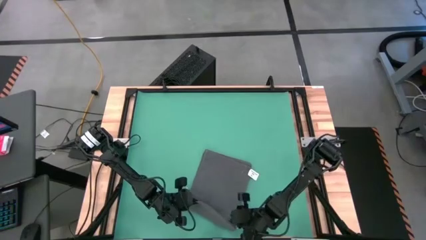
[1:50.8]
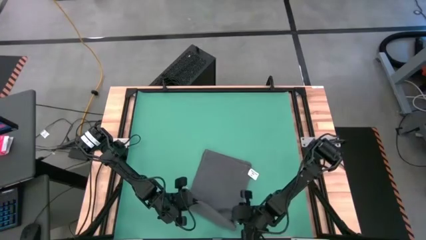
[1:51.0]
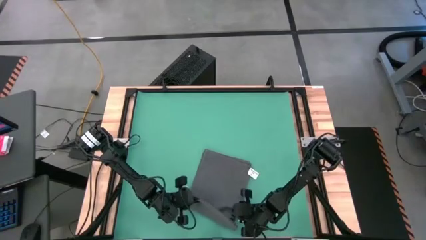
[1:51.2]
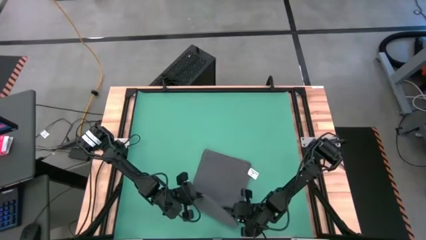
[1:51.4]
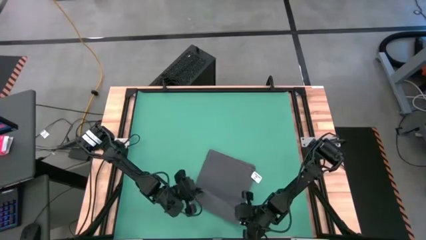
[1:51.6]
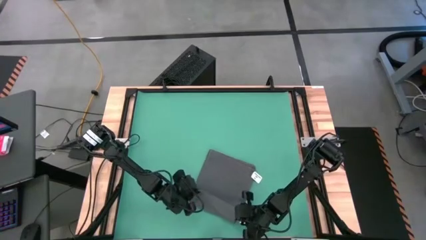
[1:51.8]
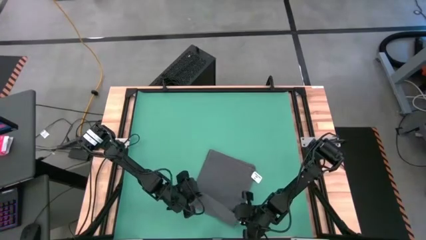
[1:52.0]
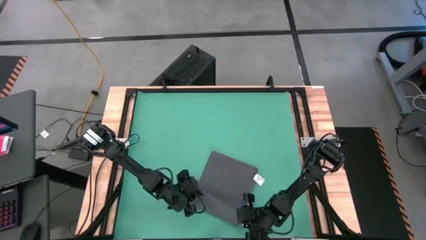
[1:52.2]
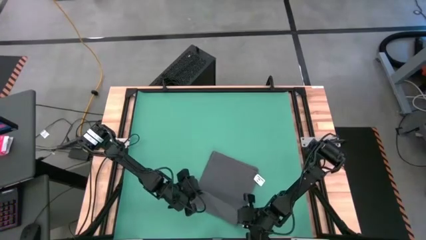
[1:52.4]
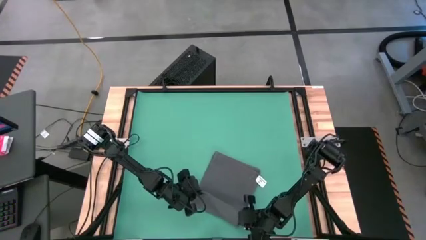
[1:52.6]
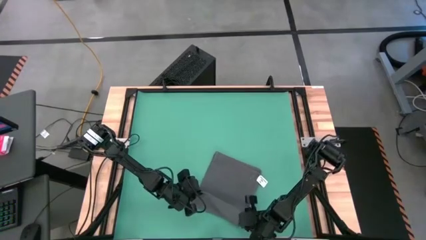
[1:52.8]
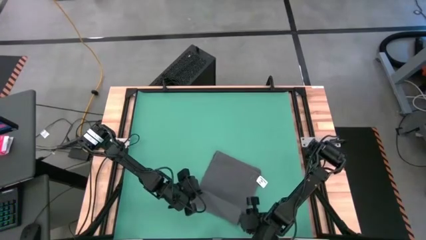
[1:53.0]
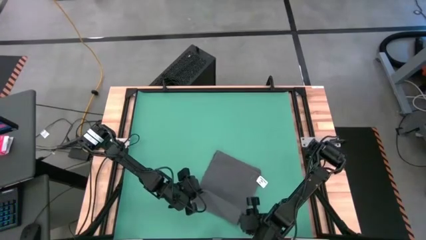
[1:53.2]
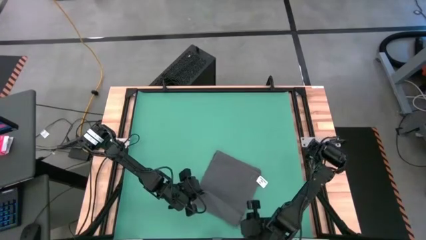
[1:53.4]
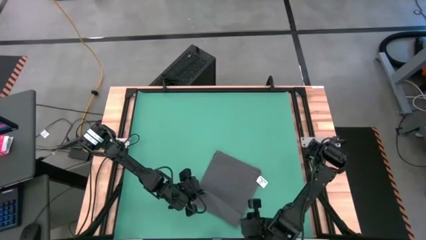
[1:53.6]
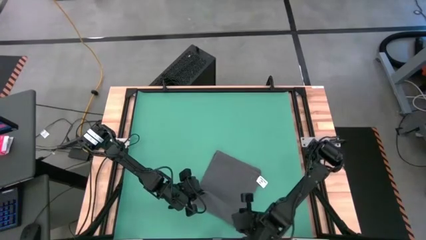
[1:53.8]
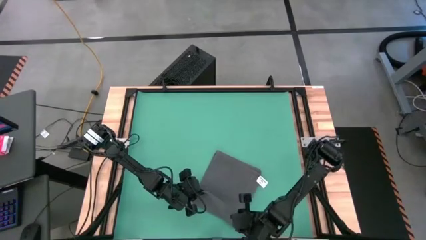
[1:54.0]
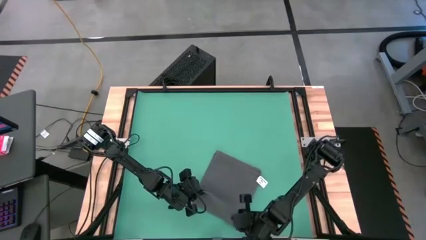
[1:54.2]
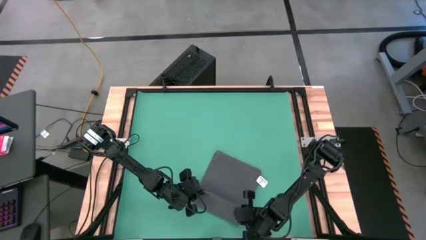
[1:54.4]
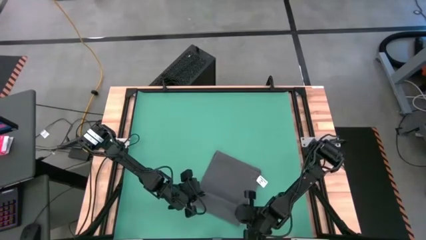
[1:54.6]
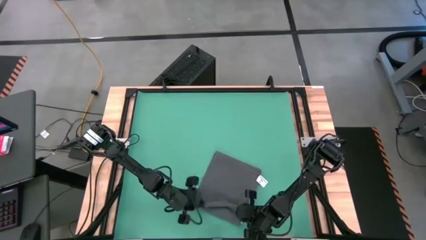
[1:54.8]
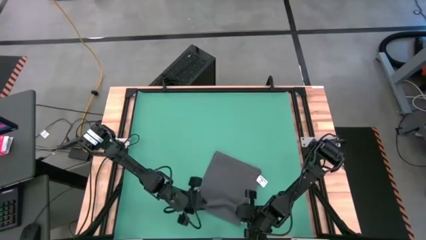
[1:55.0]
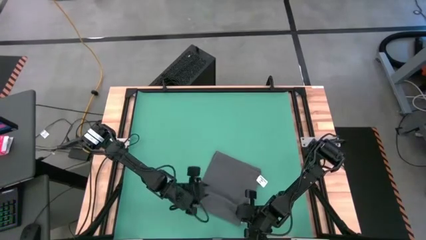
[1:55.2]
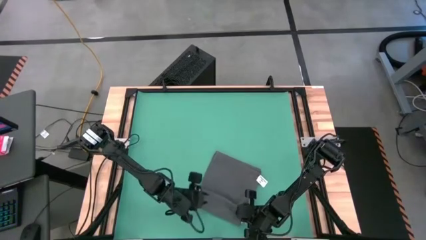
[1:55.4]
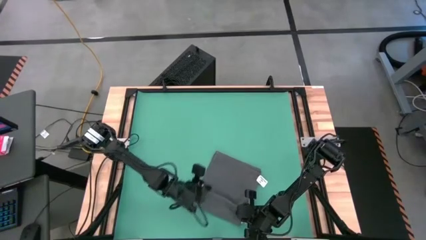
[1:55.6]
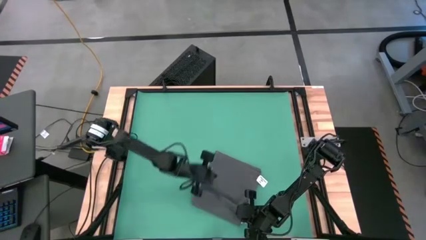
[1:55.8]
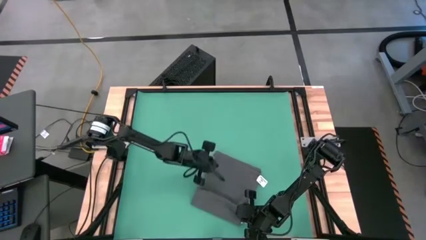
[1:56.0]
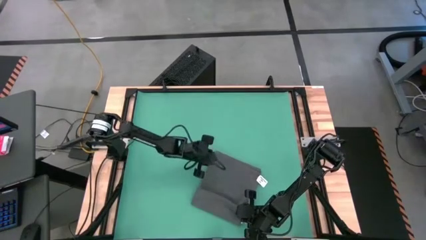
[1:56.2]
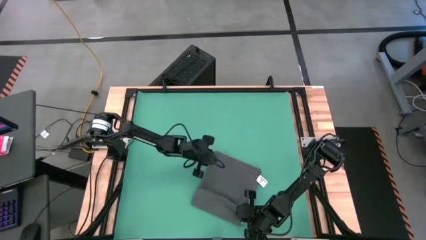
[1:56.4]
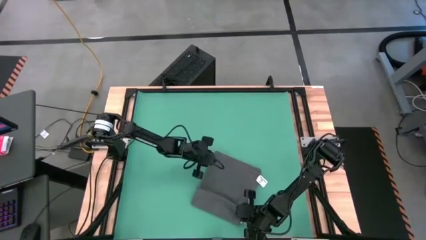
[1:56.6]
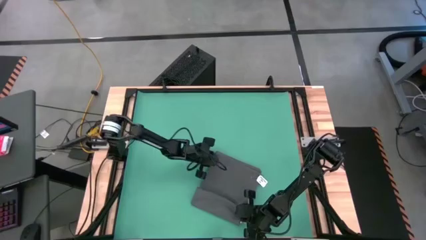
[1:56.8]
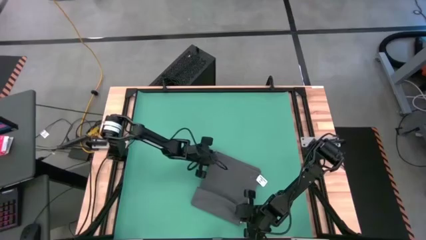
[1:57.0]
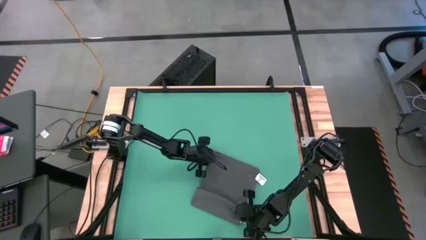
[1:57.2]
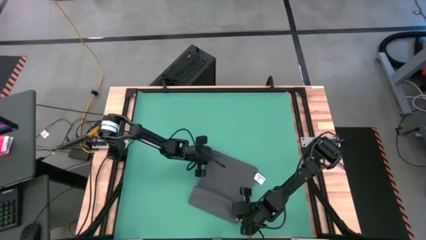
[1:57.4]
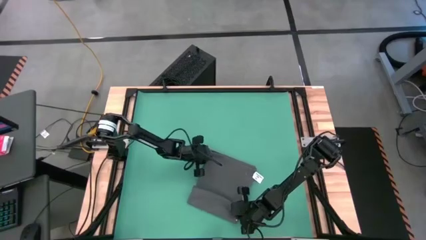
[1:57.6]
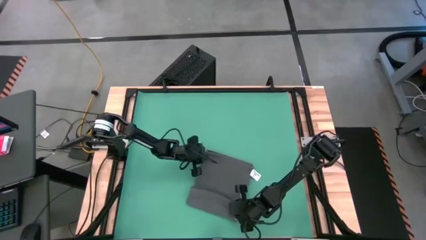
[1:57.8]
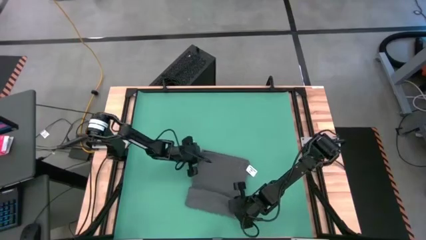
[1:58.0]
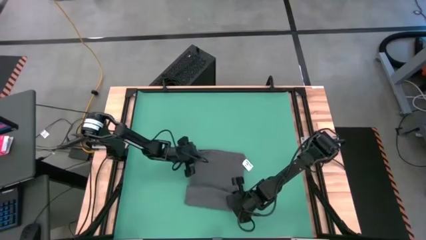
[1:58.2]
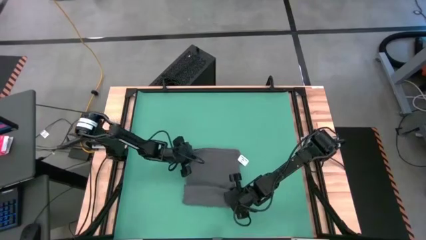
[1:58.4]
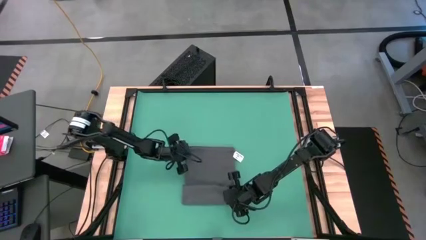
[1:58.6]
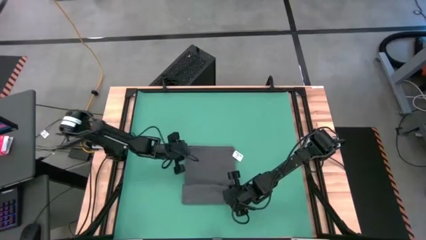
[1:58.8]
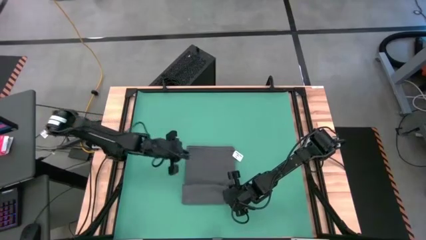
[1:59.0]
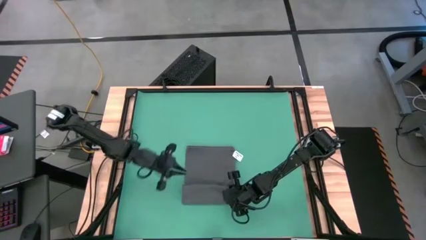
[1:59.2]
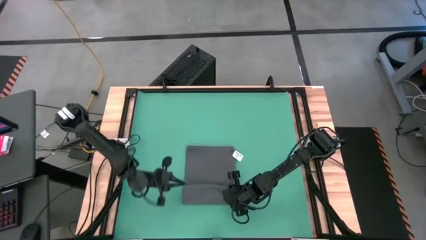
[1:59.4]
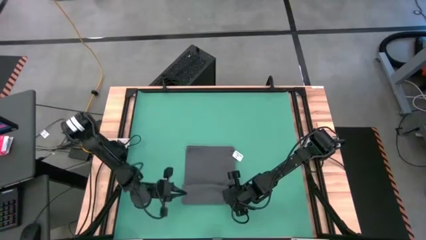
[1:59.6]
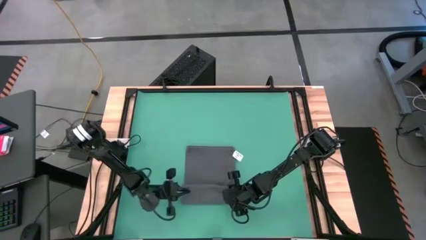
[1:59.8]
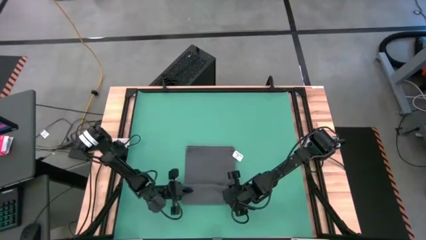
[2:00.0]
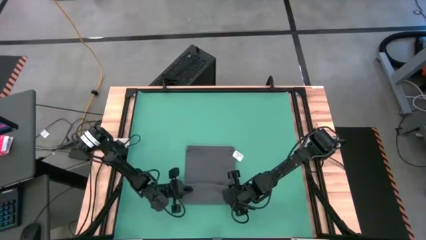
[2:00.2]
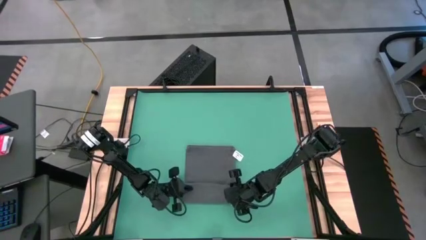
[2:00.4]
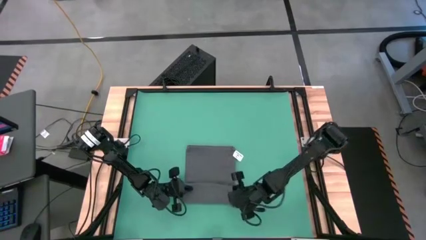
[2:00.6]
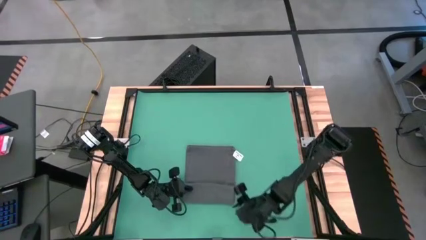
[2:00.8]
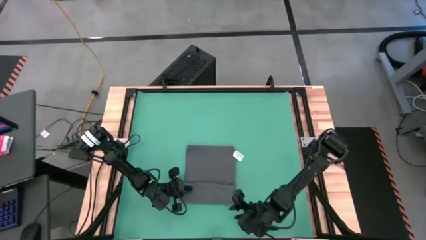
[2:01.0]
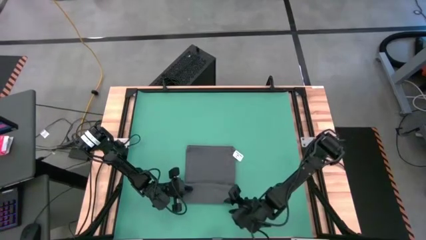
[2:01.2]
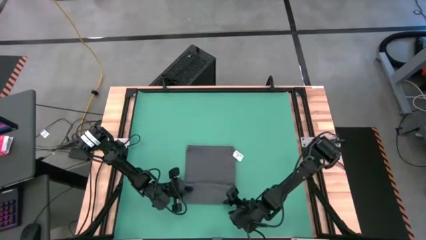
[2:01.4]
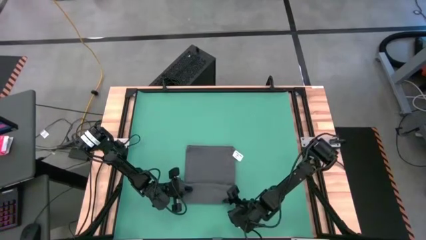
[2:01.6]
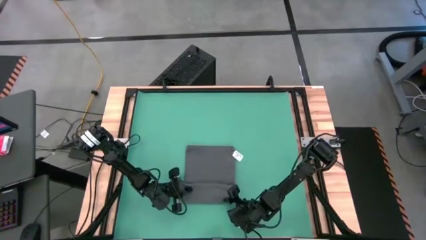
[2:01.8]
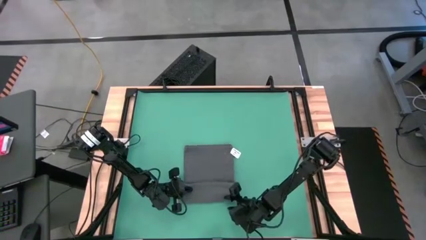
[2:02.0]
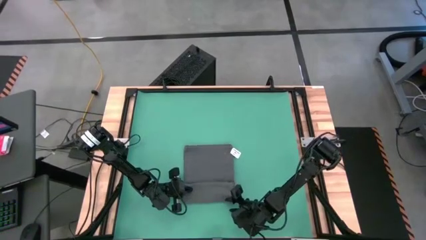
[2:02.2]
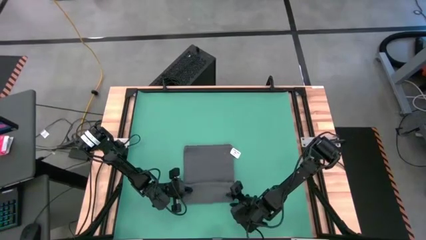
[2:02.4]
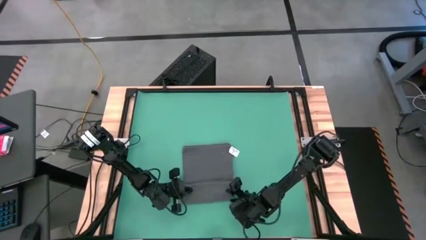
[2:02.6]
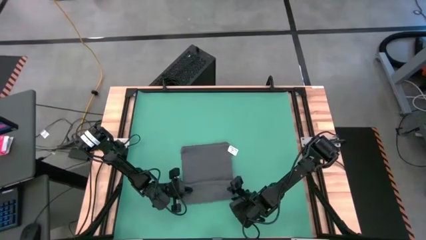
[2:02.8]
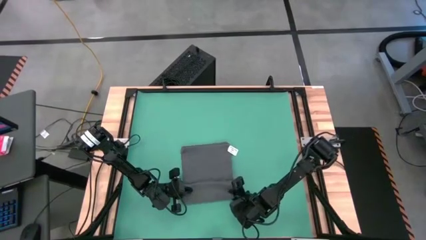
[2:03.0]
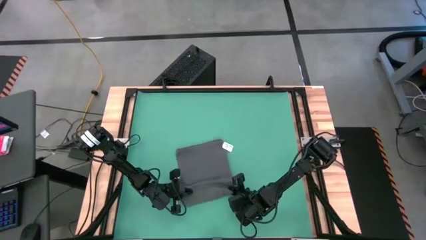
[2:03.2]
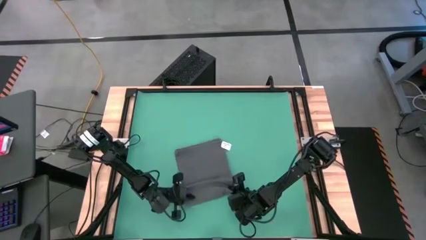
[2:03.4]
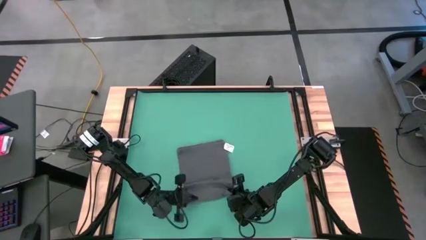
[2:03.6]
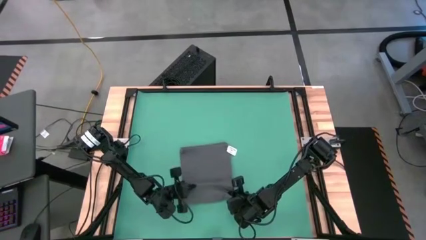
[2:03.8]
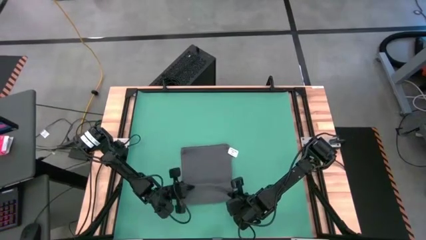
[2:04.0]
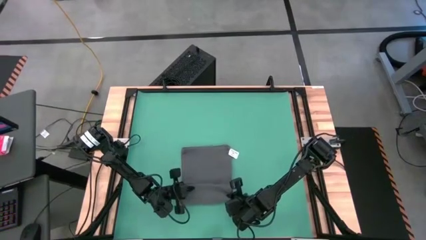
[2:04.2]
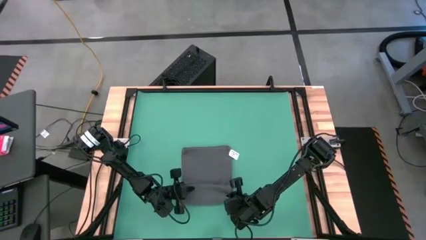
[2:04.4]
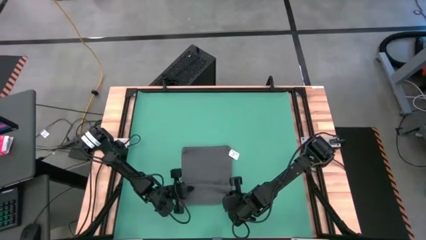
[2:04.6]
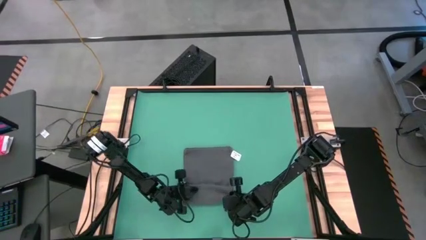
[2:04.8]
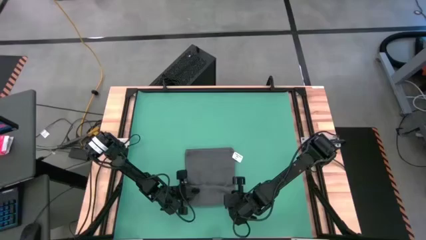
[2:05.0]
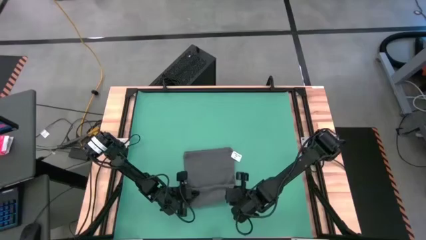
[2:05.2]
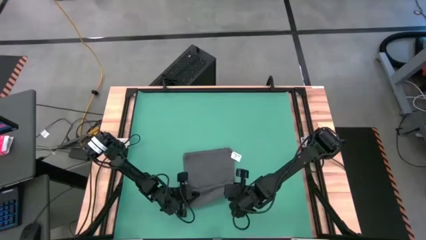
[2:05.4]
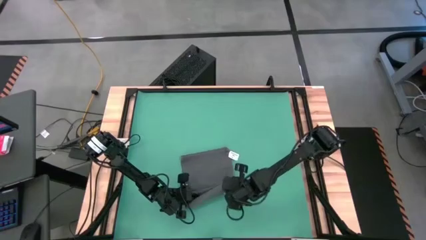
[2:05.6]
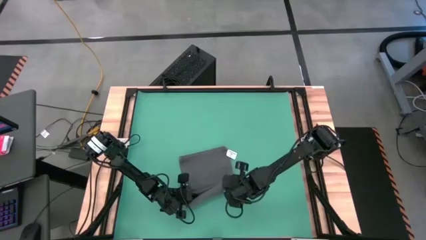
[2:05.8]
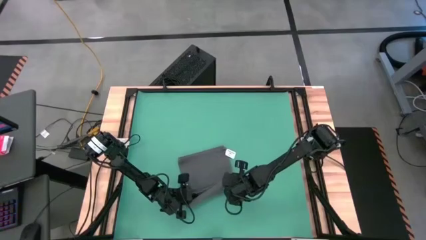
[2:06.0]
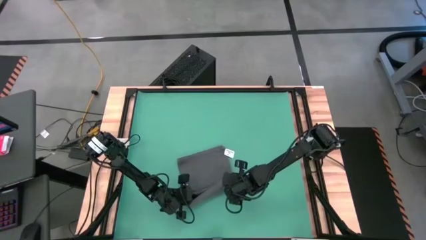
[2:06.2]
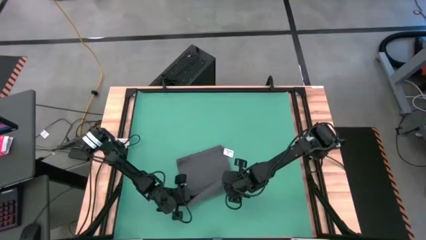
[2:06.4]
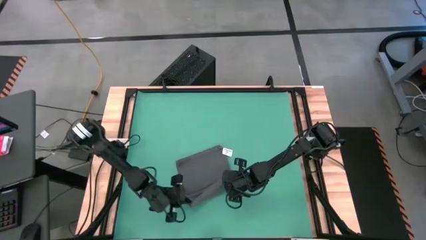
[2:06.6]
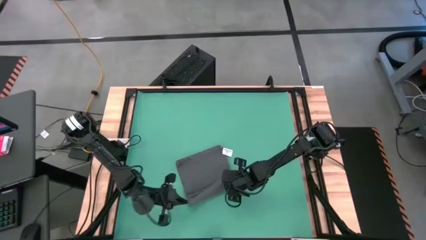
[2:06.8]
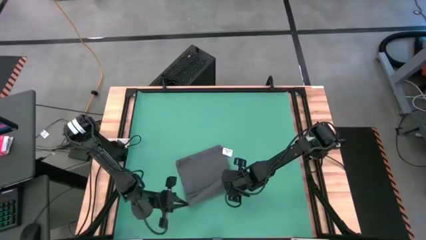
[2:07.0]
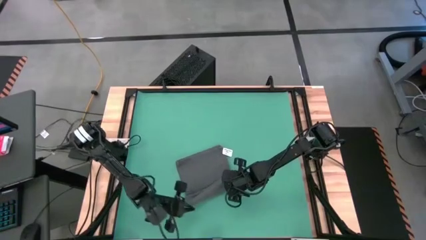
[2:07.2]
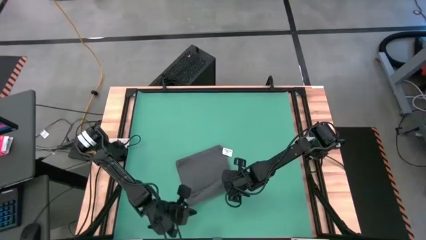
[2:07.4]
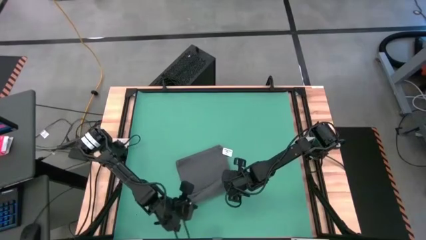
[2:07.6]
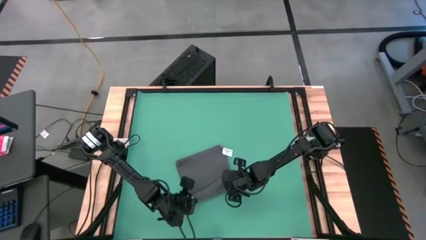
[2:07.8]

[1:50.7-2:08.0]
Task: Roll towel
Roll the gray towel
